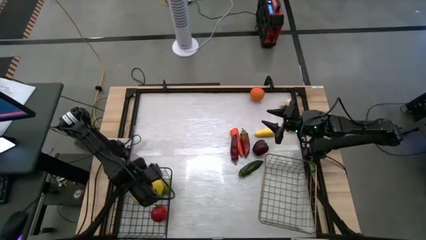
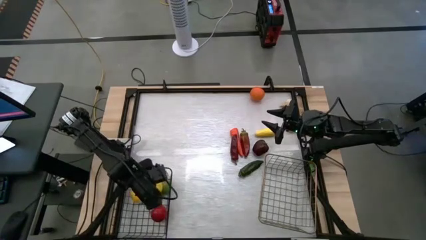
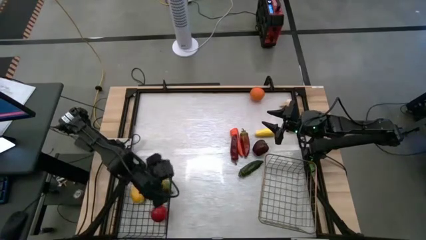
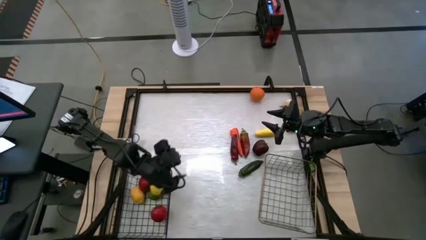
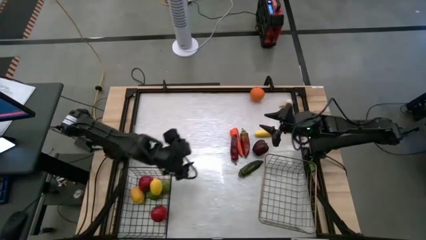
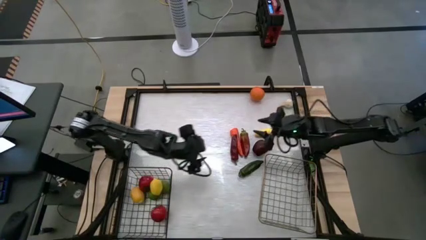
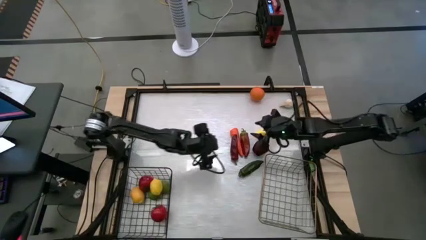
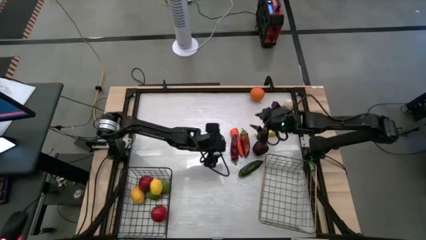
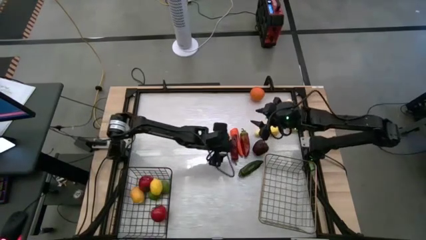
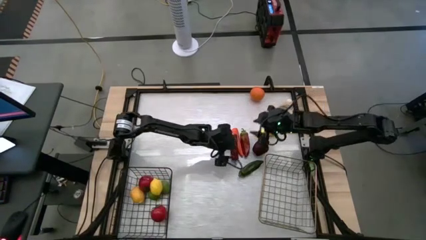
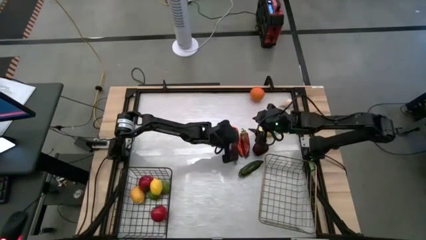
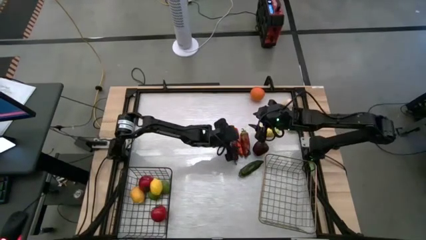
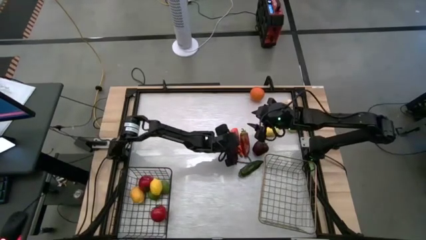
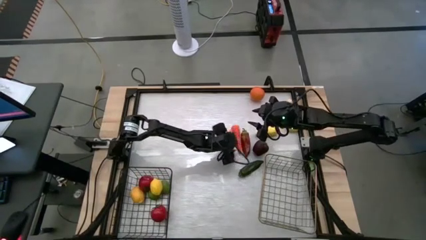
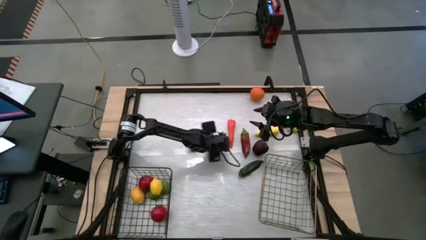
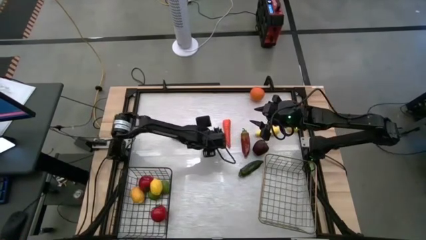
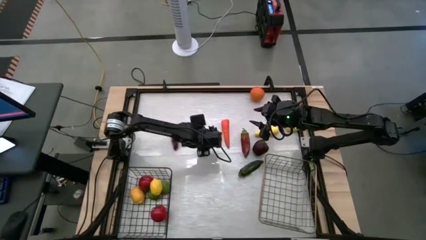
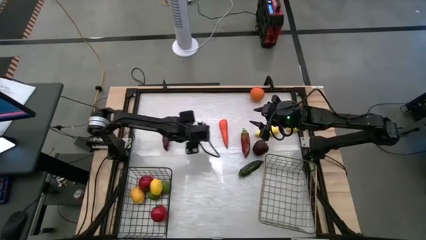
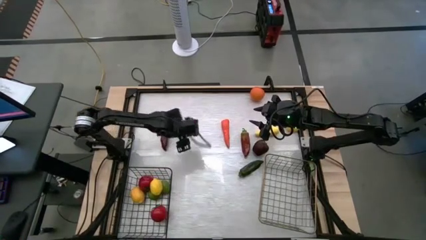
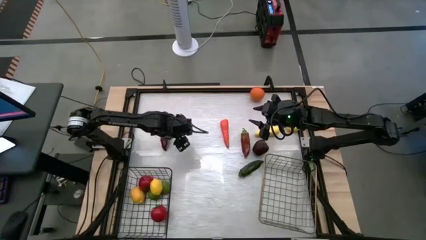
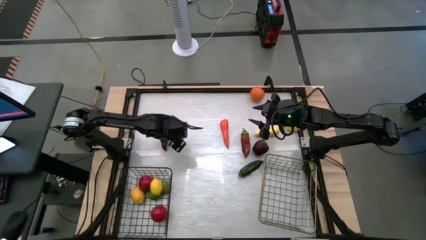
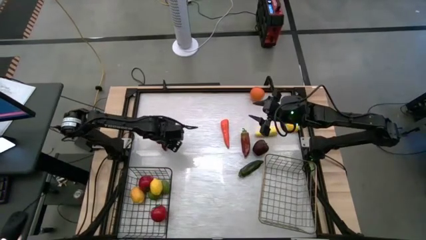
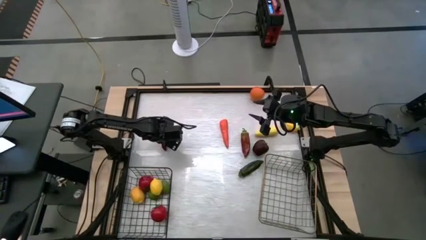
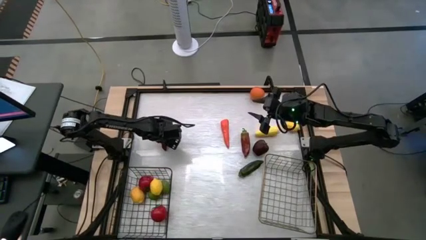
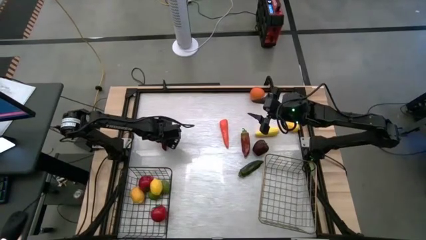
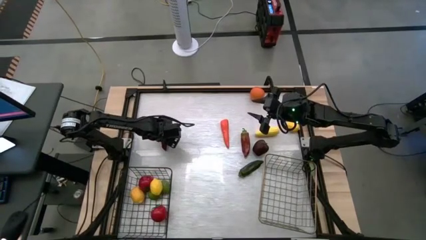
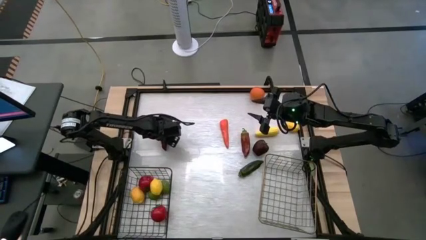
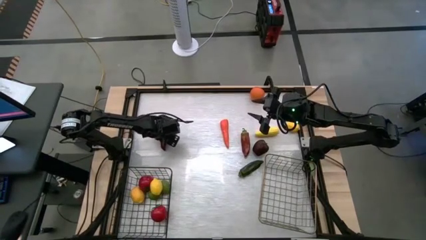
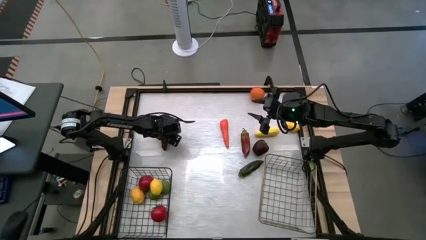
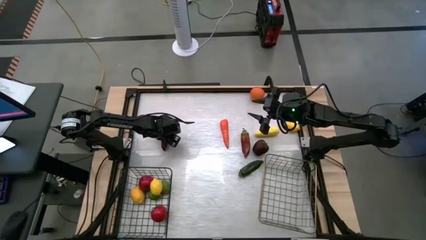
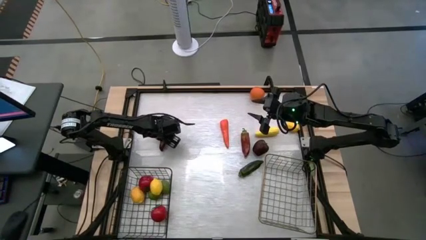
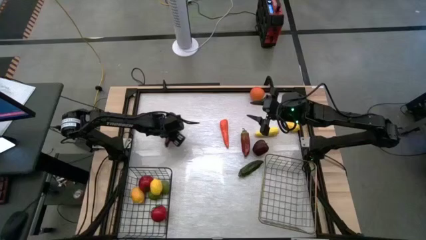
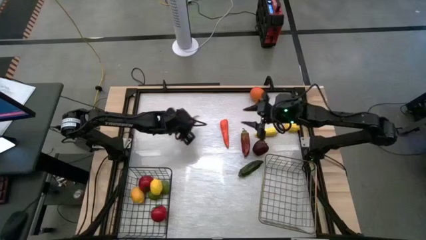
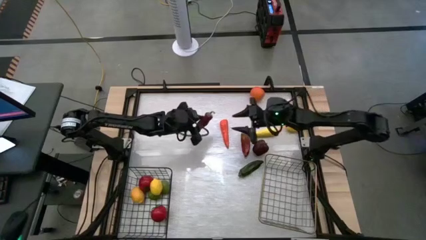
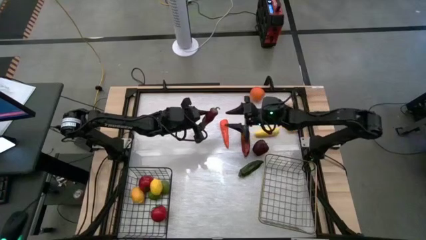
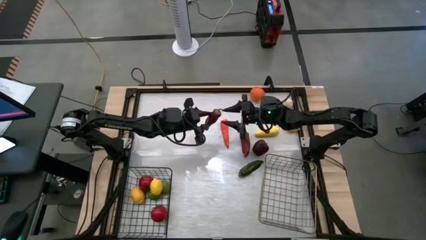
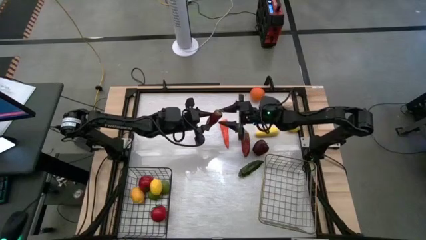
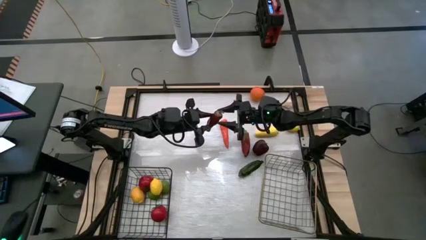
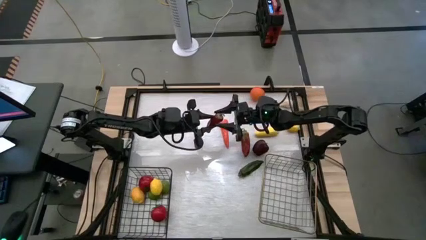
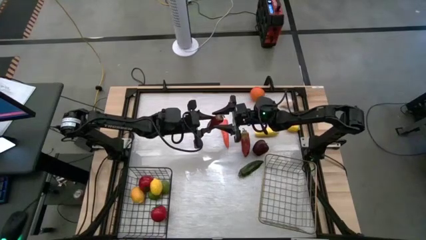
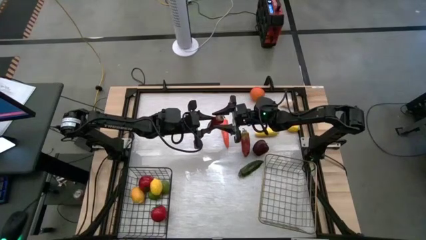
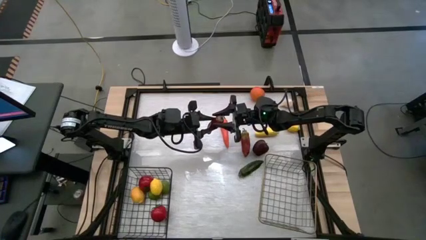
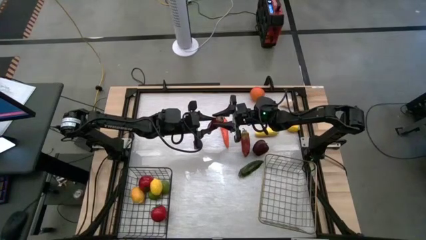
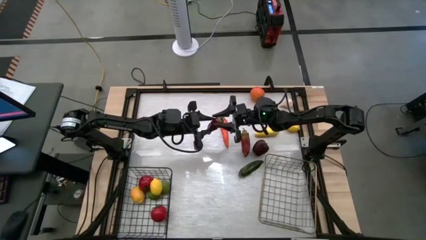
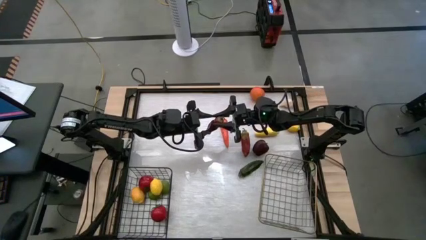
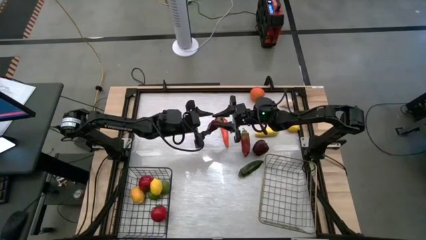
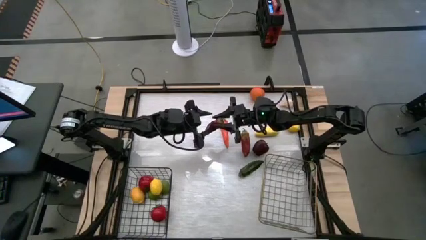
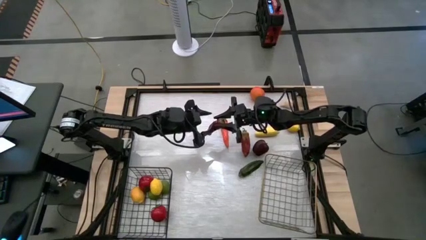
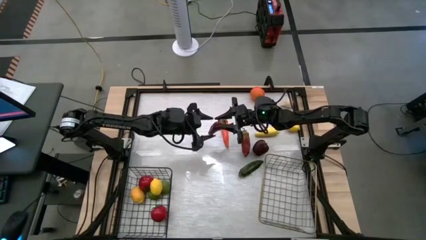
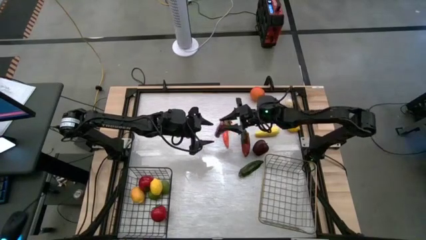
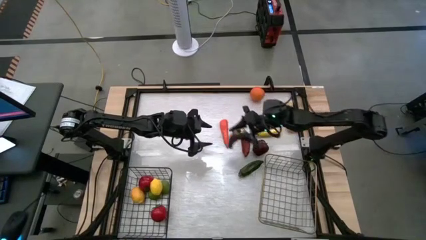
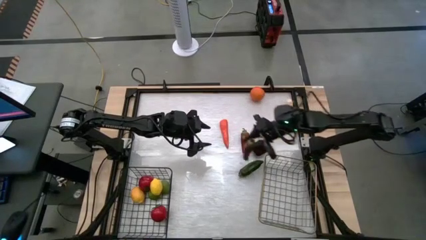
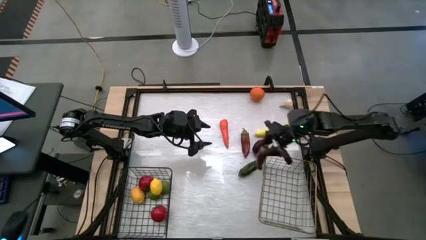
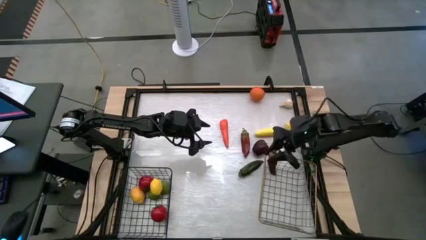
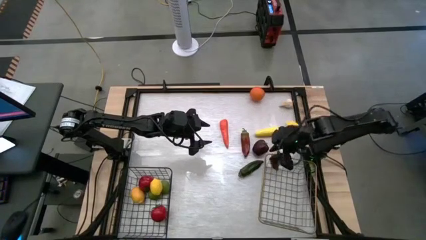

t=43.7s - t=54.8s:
Task: Sort produce into baskets
Put the left red chili pepper into the gold wire basket

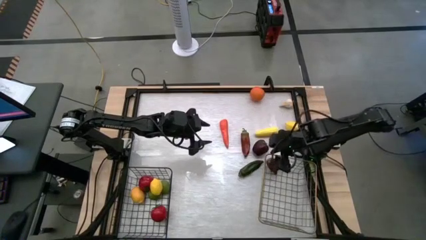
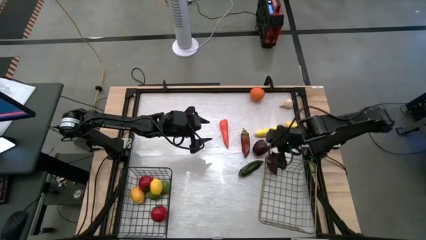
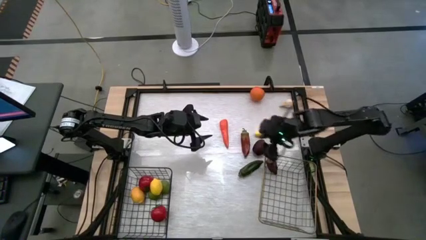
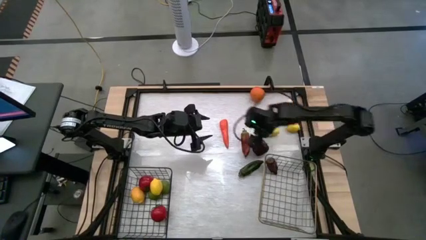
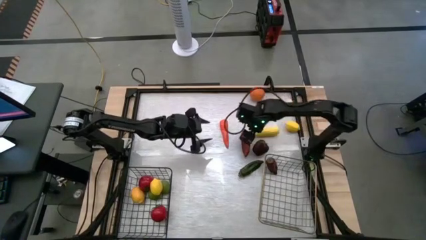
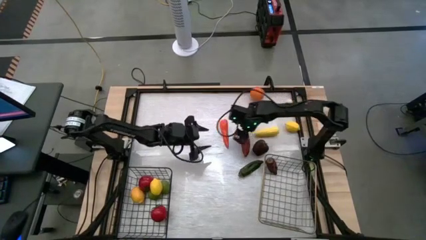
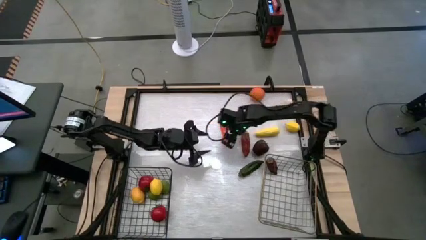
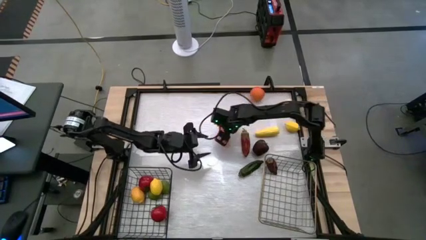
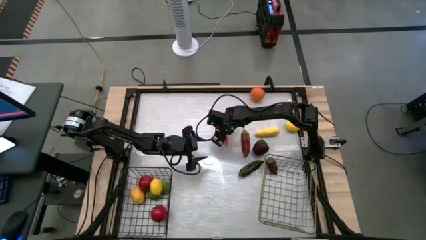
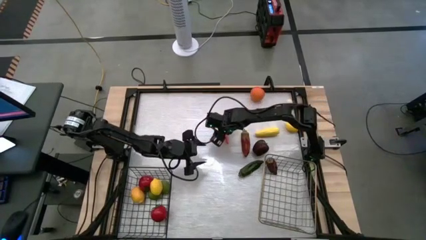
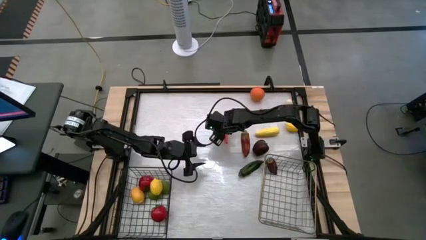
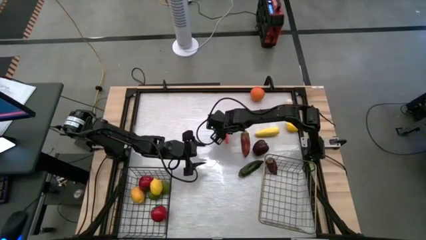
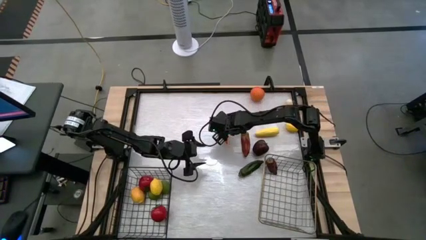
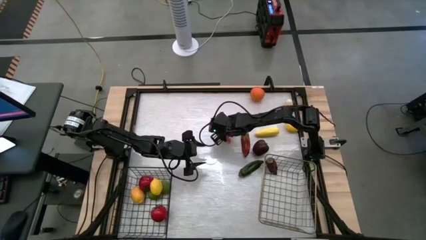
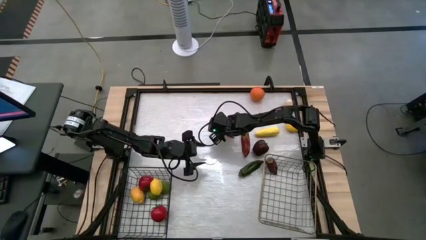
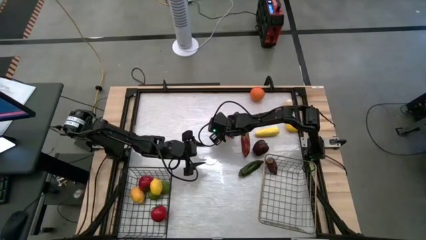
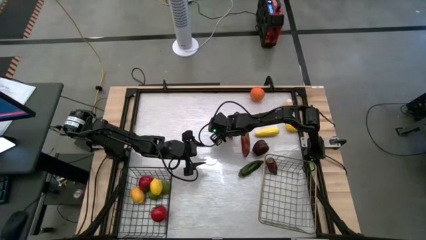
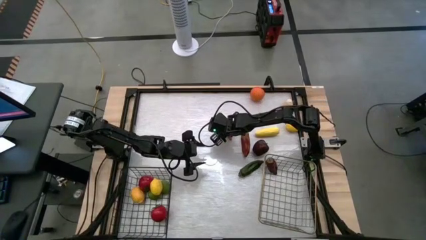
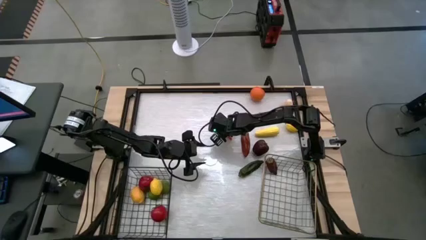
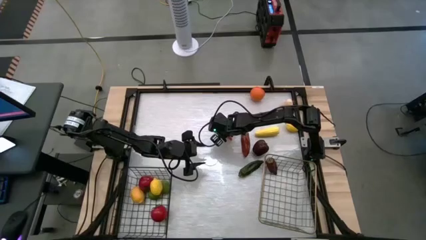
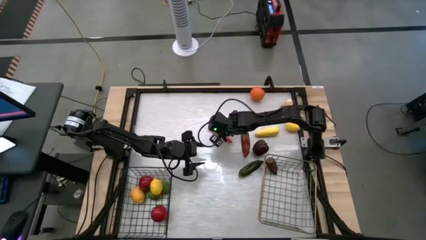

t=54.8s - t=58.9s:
Put the orange carrot into the gold wire basket

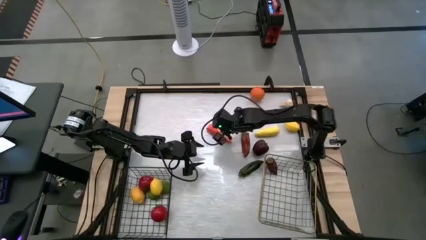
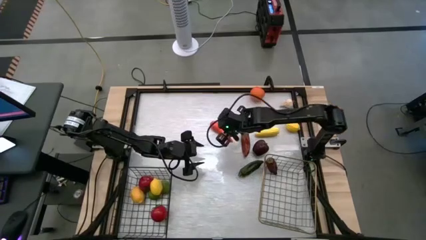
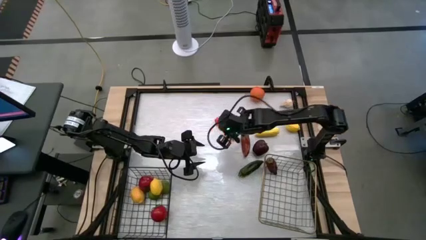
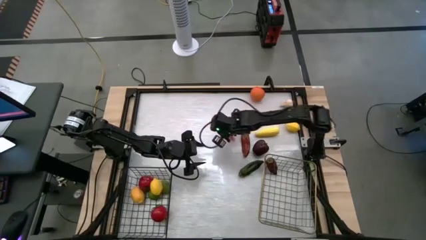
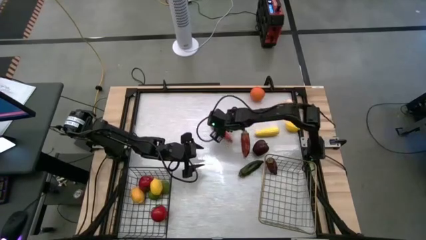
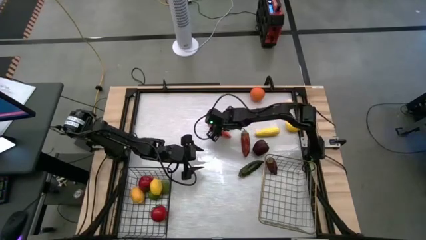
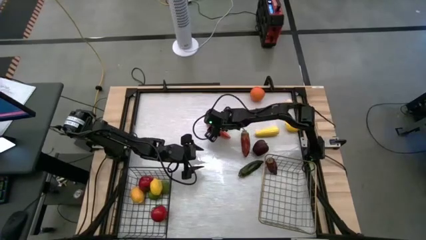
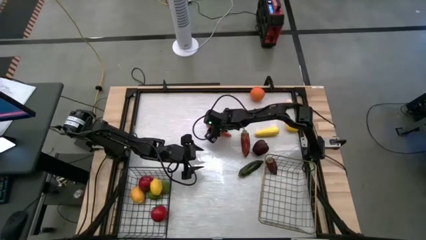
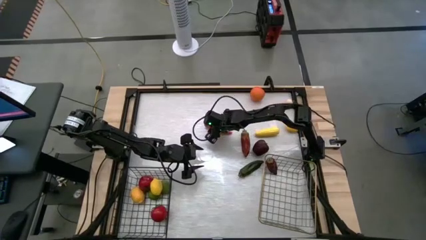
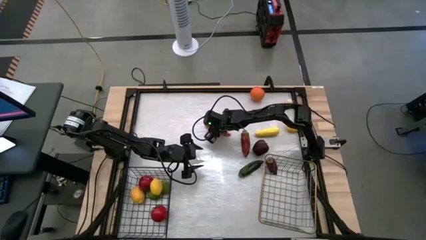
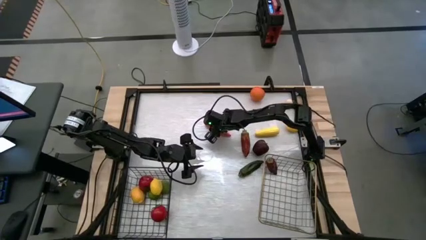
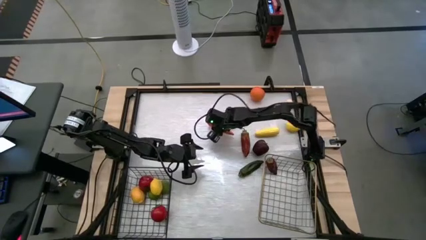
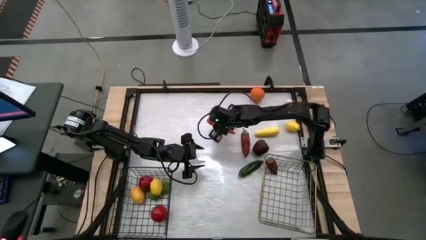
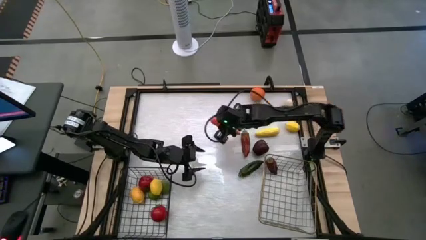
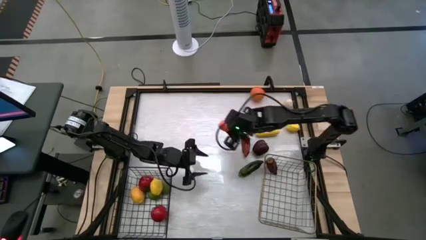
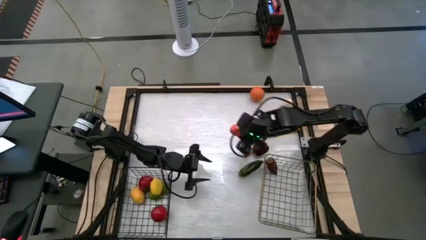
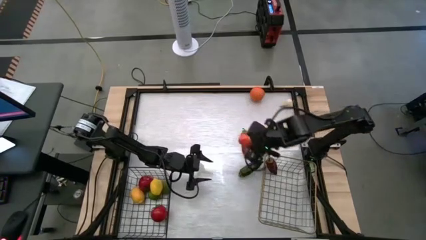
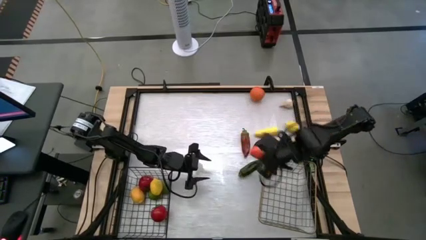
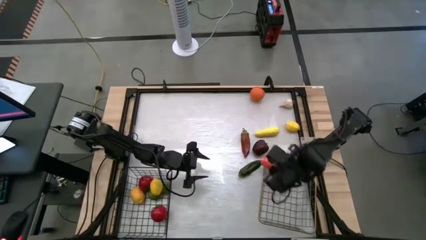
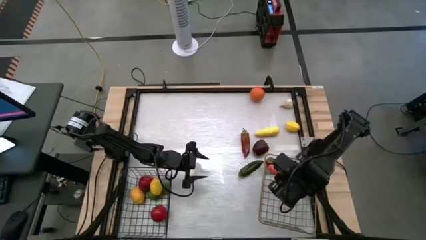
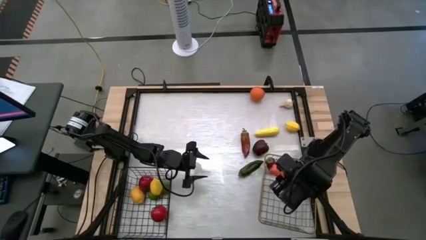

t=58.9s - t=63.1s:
Put the orange carrot into the gold wire basket
